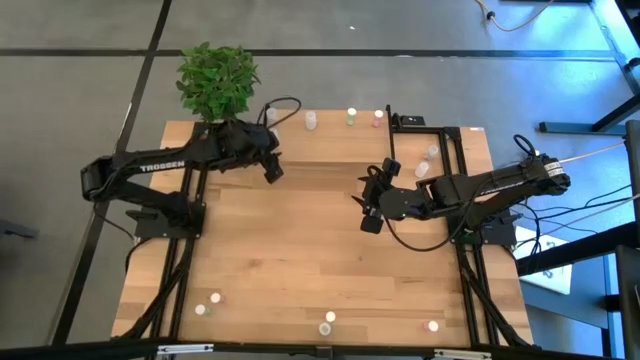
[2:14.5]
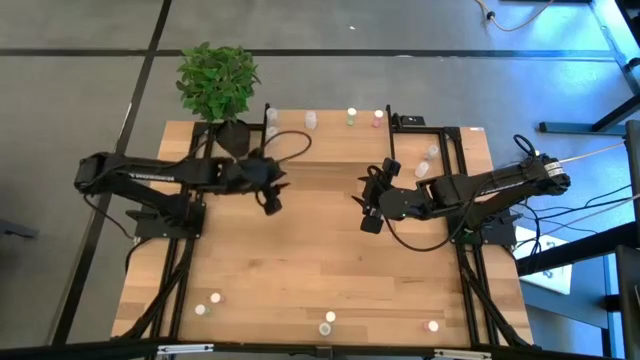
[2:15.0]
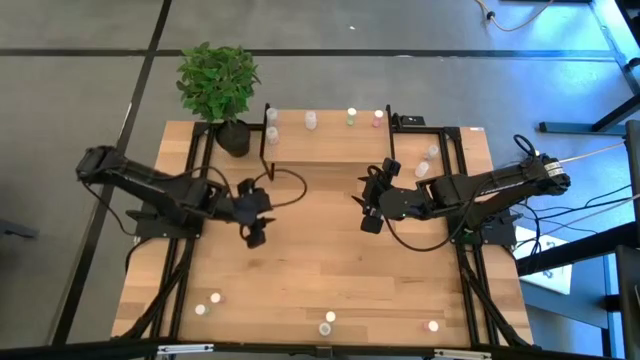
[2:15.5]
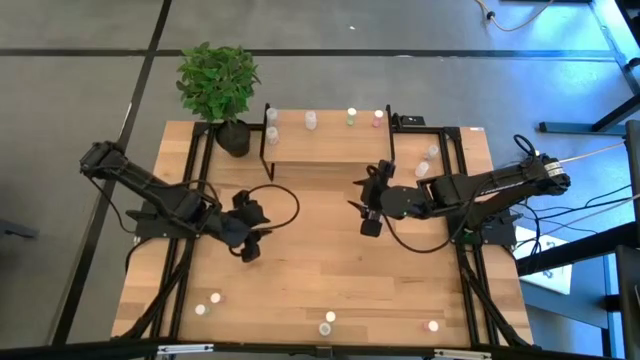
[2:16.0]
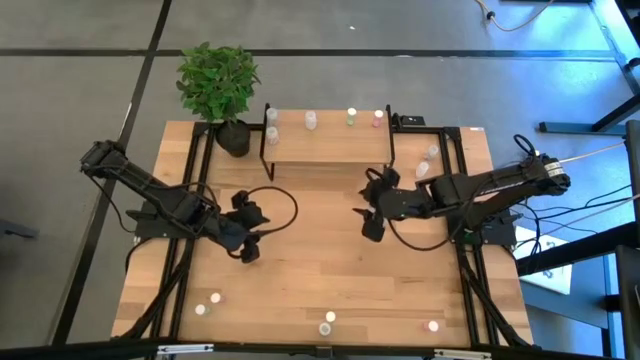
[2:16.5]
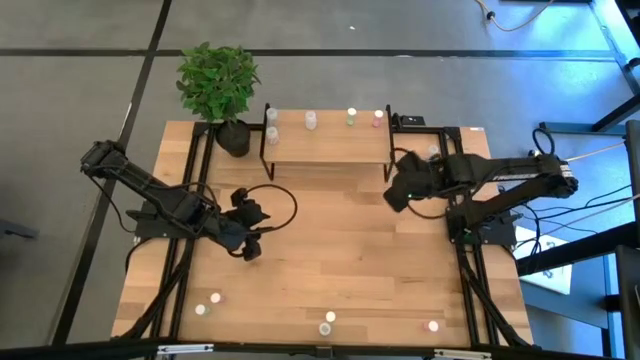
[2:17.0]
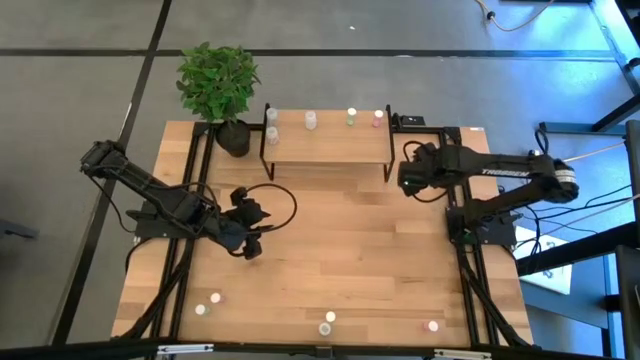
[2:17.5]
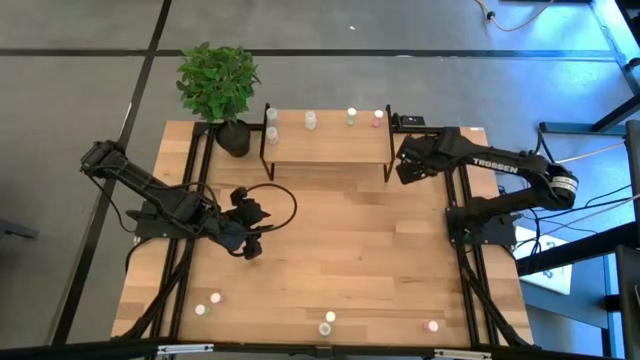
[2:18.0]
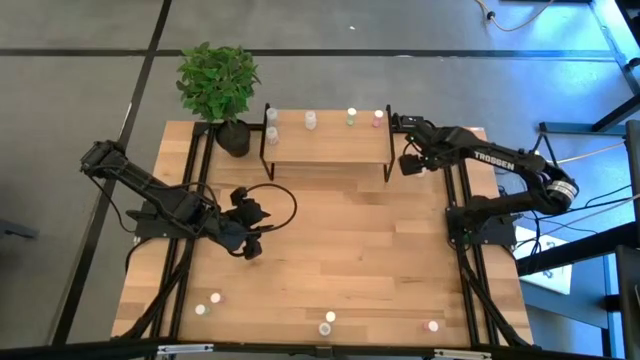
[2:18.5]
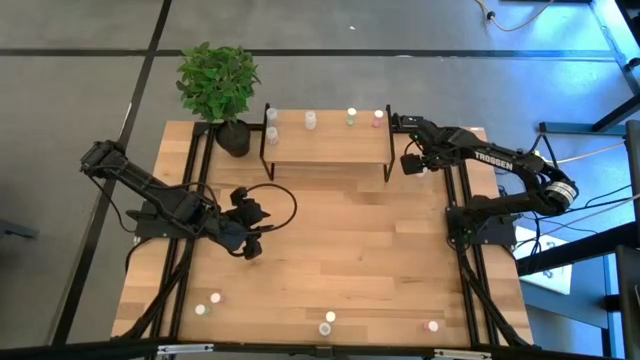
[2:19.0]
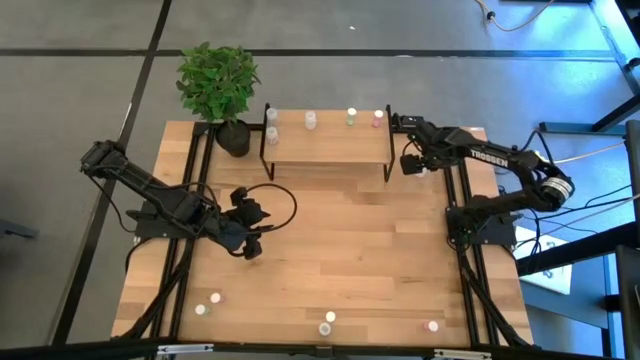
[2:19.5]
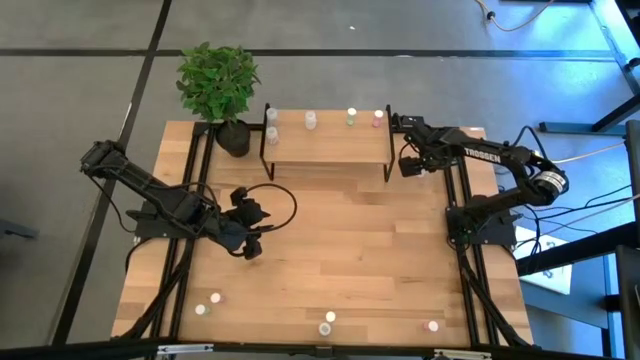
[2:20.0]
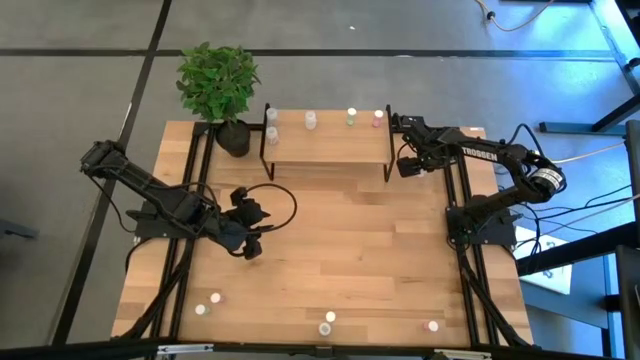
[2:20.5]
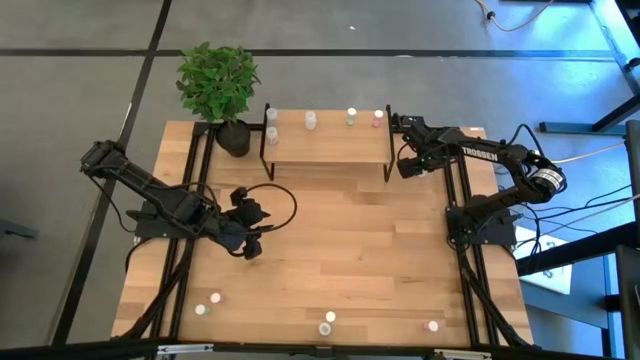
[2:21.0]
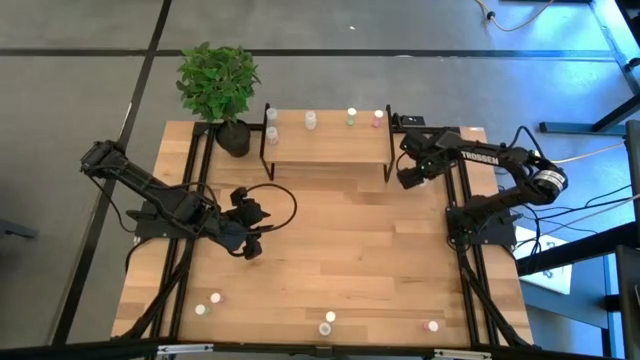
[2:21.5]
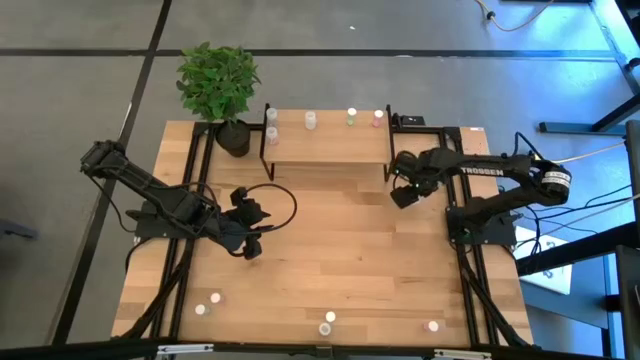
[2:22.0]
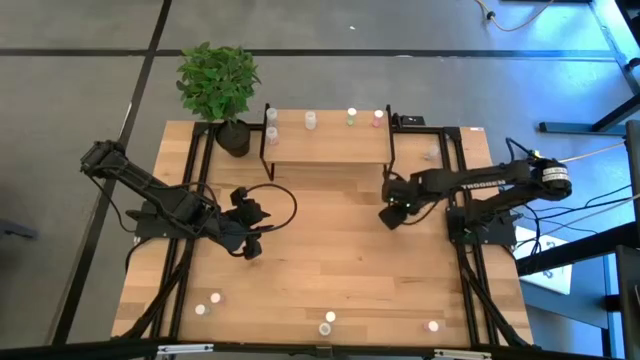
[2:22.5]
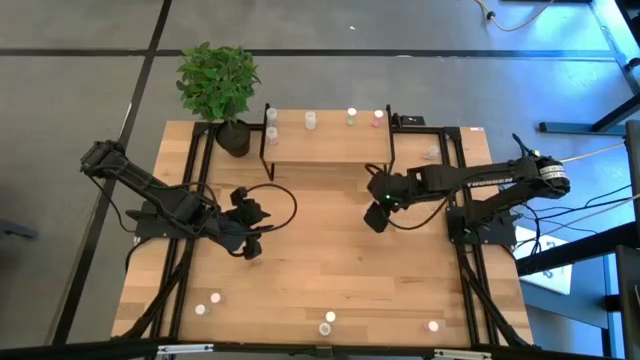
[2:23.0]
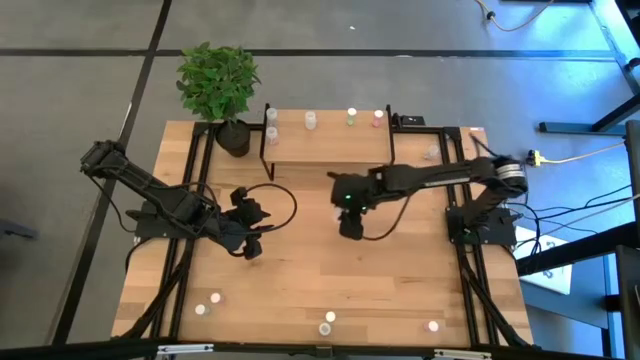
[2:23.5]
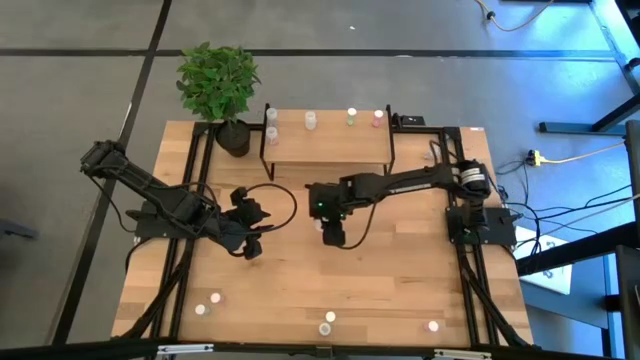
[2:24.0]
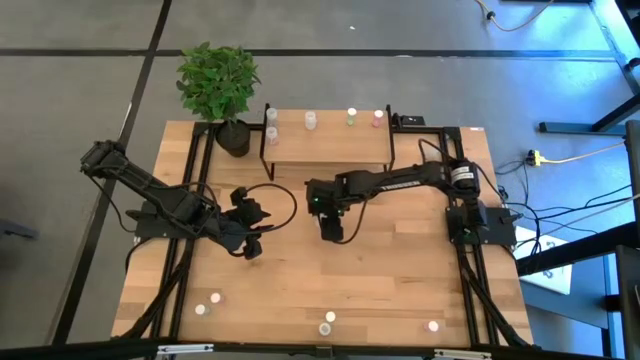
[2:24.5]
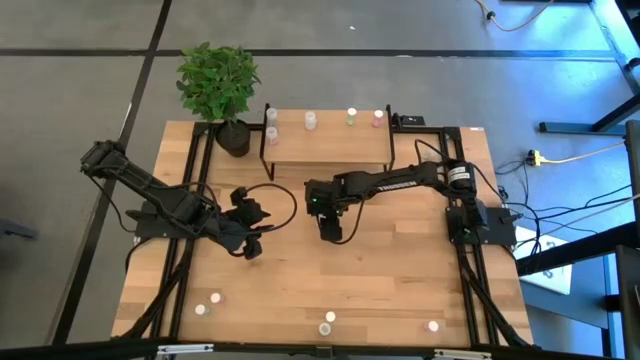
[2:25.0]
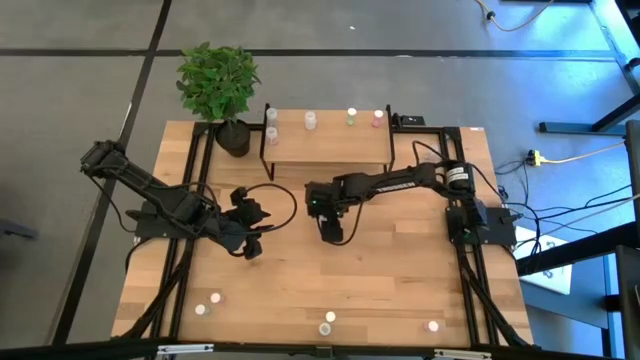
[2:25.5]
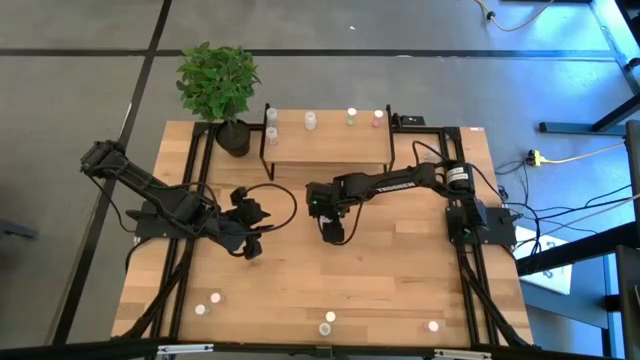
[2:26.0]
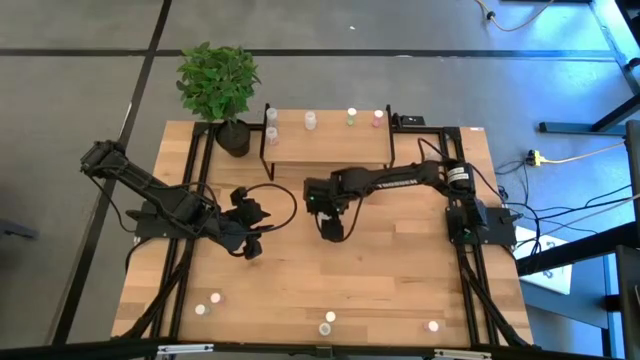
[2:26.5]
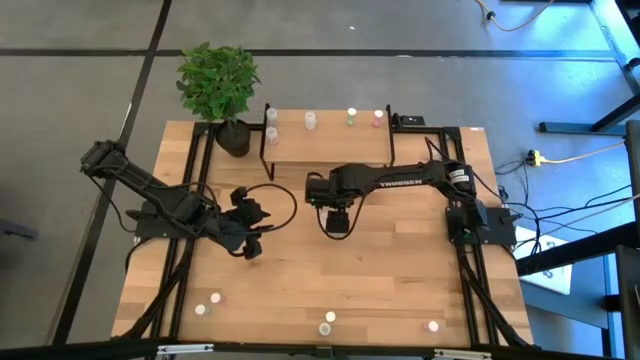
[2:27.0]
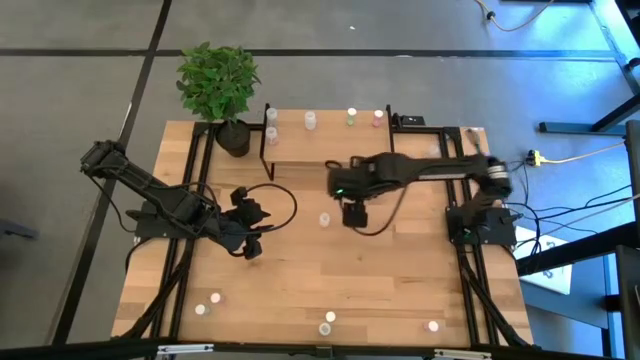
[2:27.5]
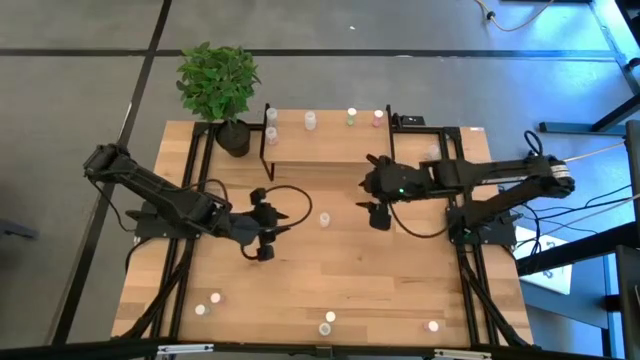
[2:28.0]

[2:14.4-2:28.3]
Task: Pick and place medicine bottles onto shelf by color
Put the top white pill bottle on the shelf aligned with the other white pill bottle

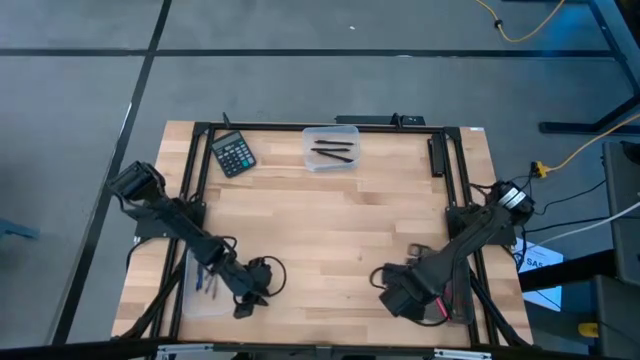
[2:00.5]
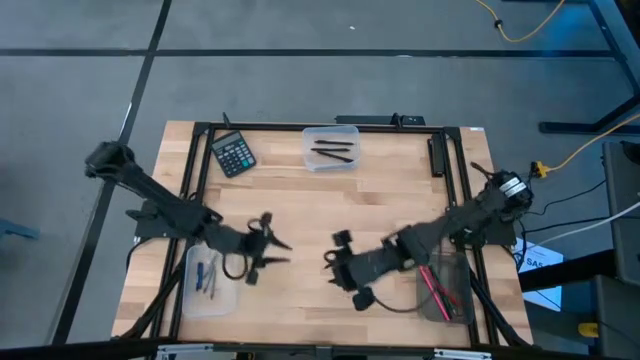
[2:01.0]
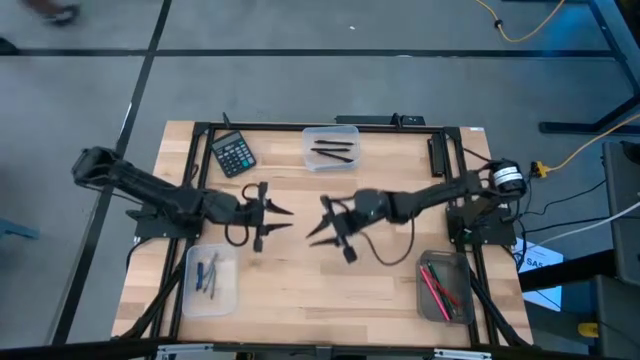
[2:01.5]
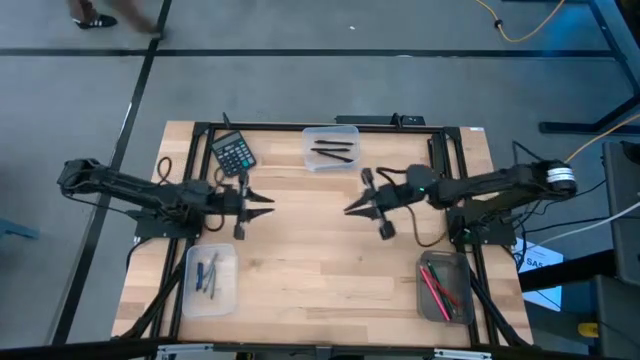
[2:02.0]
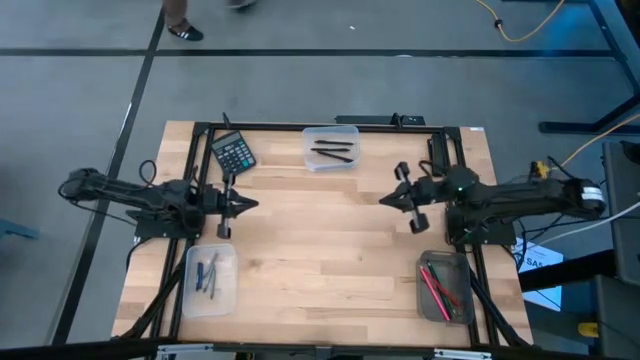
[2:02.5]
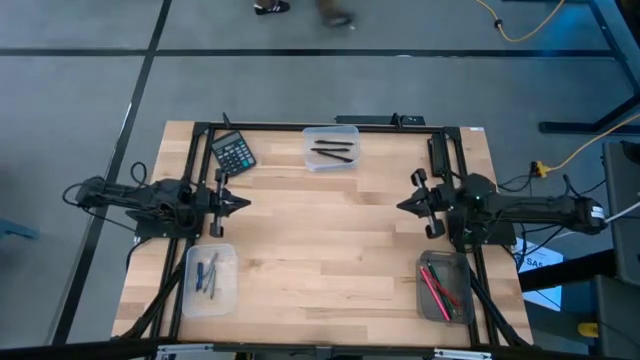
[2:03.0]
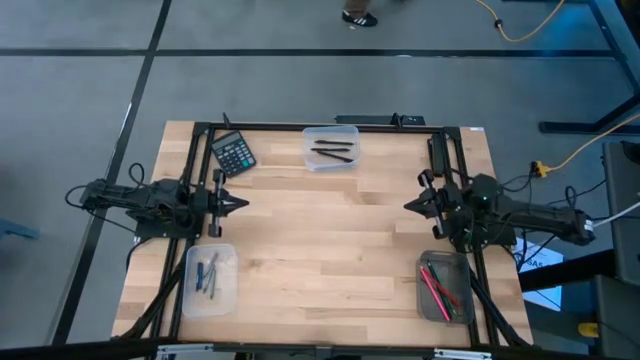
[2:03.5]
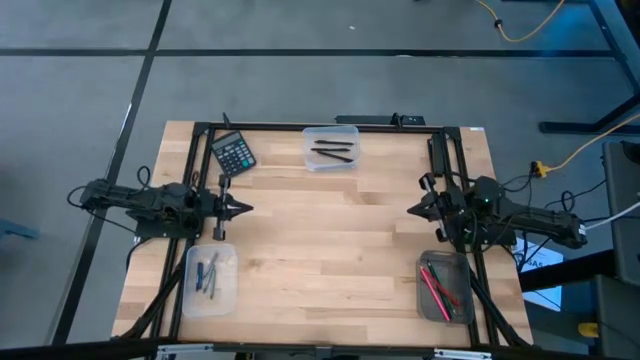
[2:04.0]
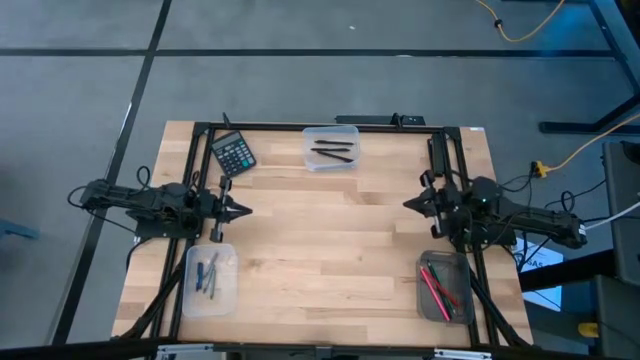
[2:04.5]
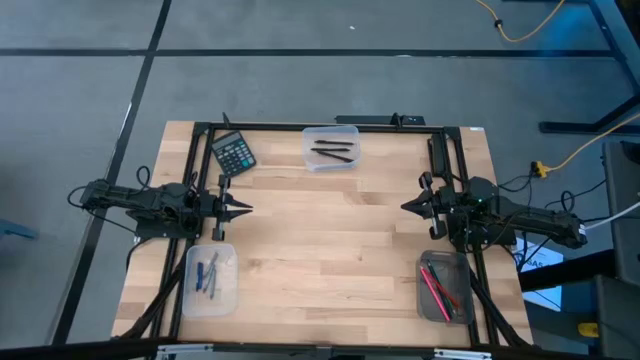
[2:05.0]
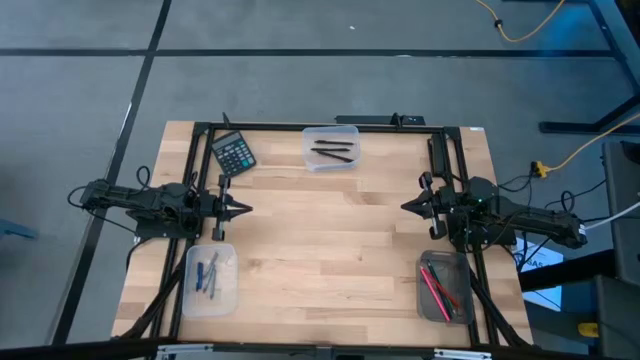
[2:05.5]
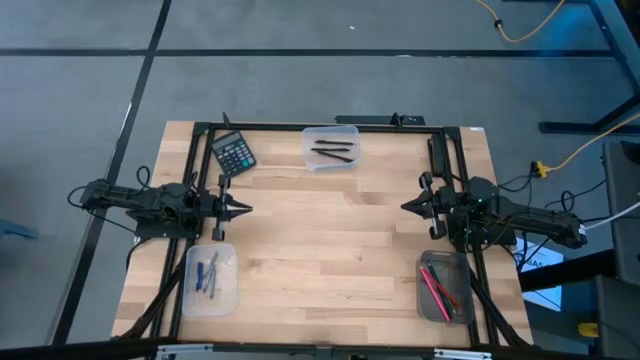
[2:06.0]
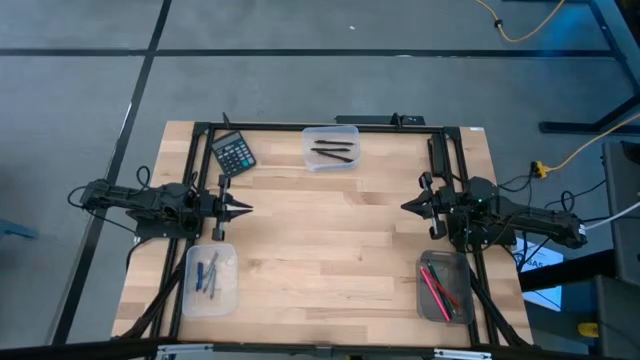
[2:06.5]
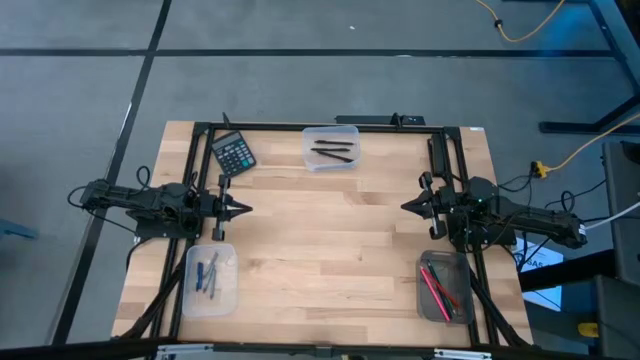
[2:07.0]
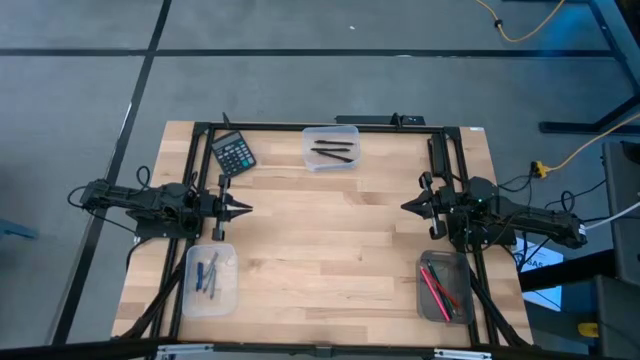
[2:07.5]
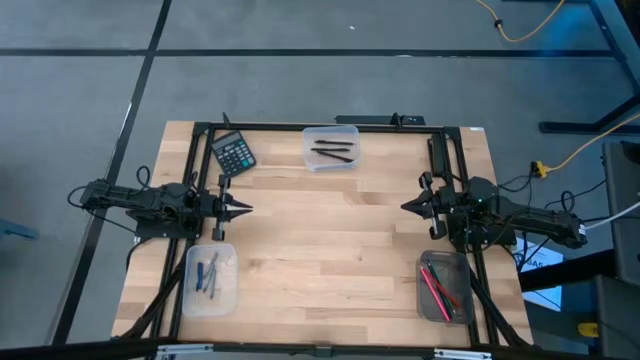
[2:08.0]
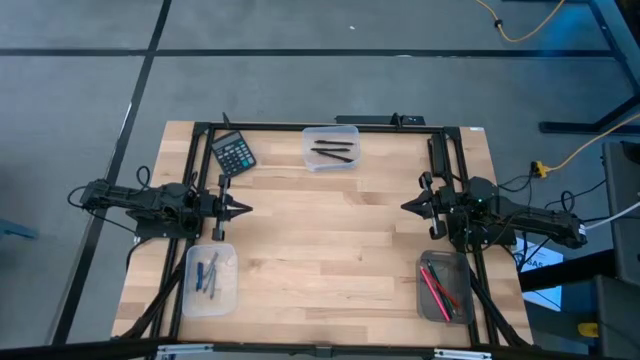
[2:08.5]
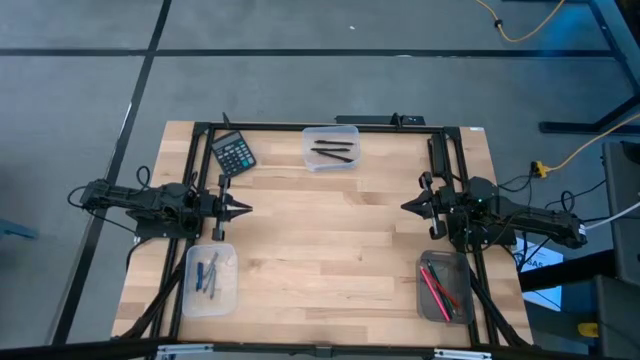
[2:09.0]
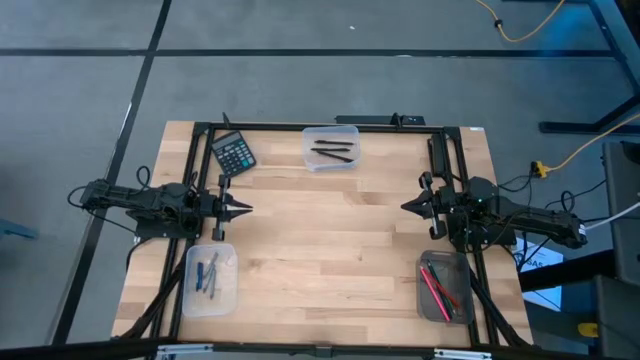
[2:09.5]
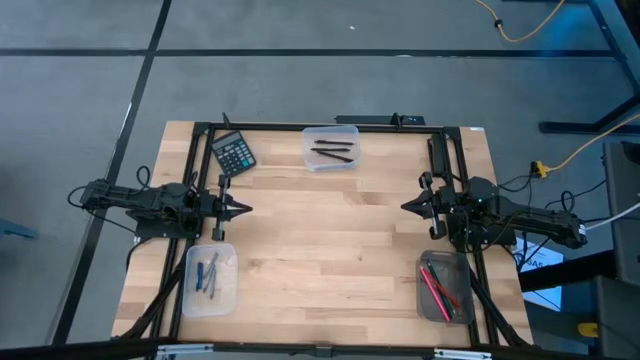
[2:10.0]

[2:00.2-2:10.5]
Task: Sort crayons/erasers/pens/pencils in bins
Return to Home Position
